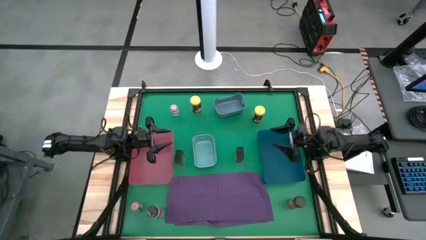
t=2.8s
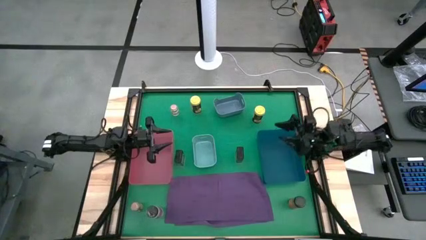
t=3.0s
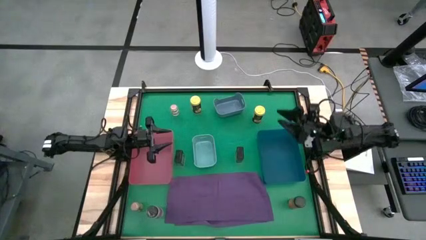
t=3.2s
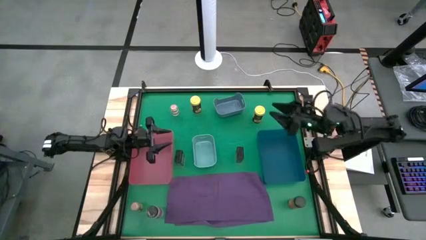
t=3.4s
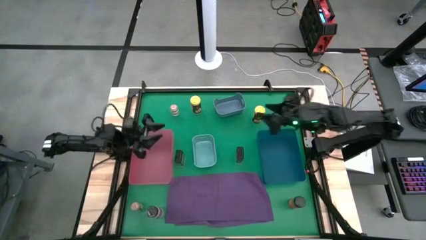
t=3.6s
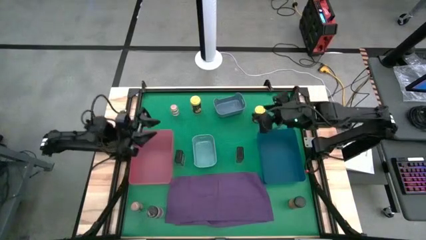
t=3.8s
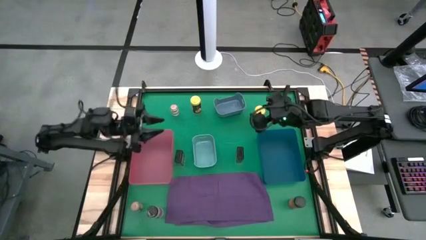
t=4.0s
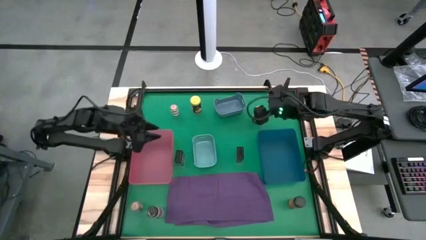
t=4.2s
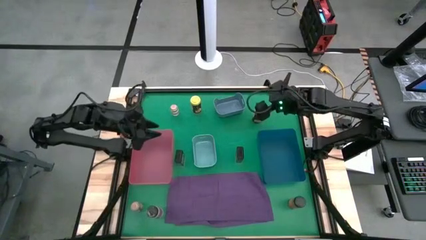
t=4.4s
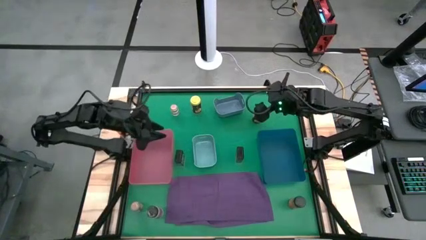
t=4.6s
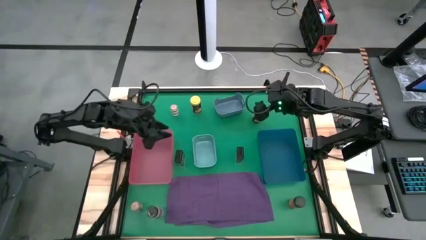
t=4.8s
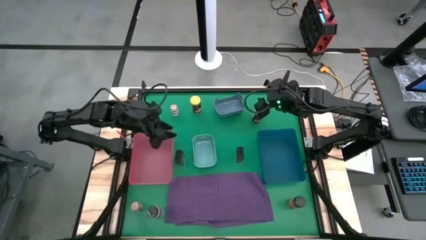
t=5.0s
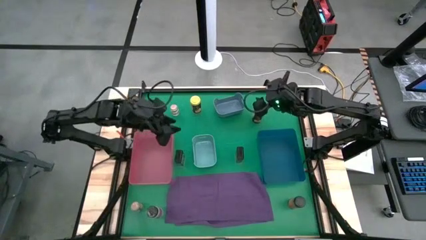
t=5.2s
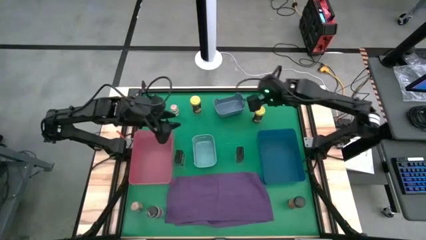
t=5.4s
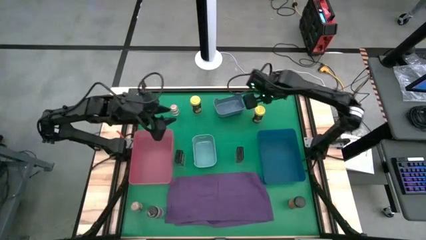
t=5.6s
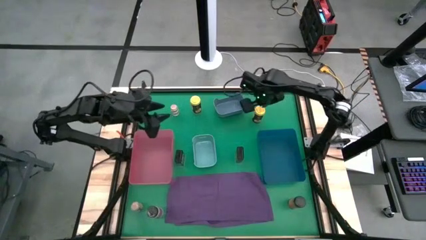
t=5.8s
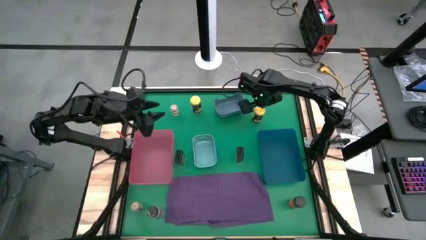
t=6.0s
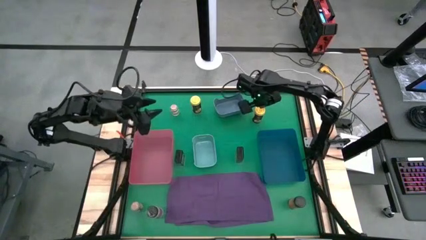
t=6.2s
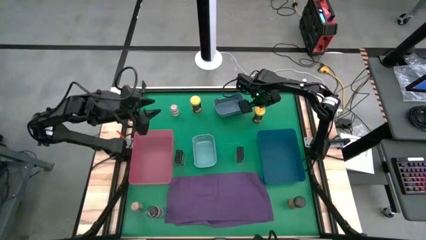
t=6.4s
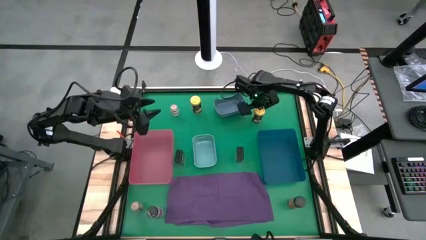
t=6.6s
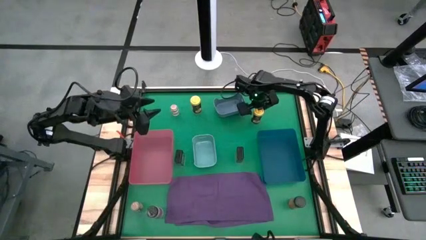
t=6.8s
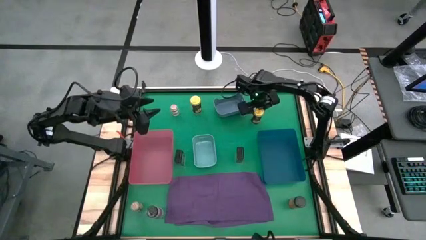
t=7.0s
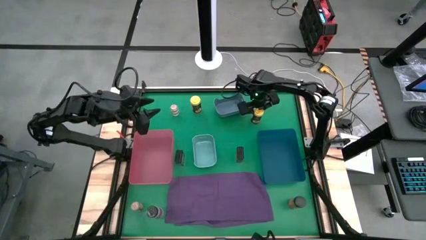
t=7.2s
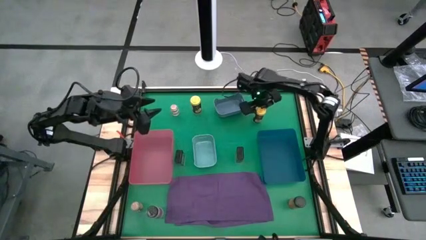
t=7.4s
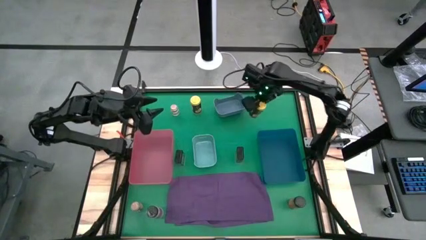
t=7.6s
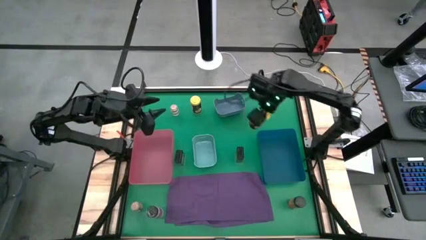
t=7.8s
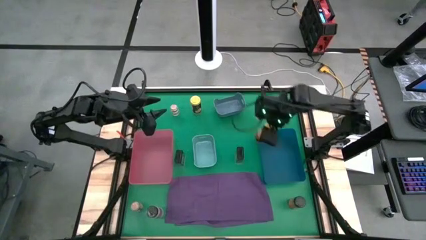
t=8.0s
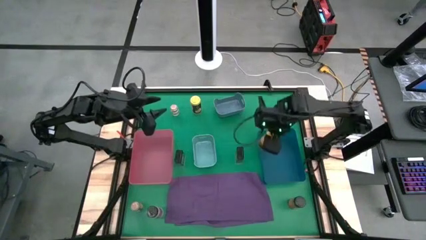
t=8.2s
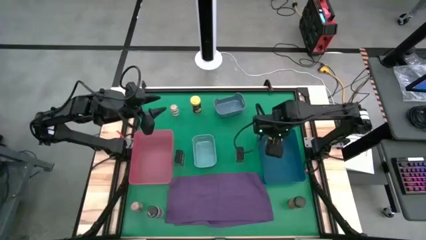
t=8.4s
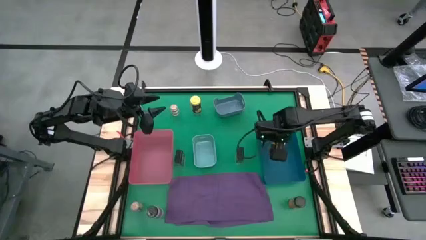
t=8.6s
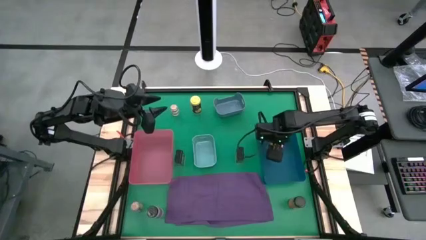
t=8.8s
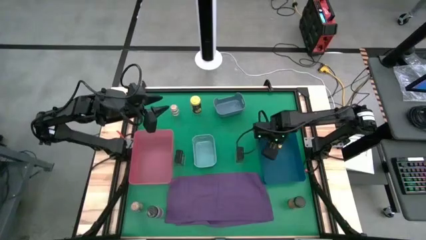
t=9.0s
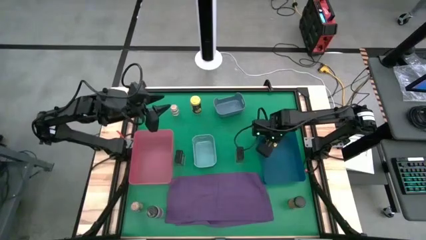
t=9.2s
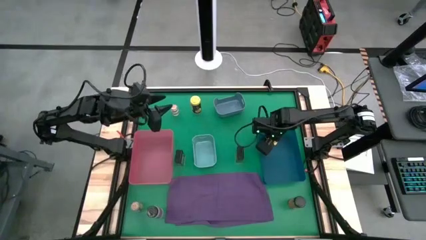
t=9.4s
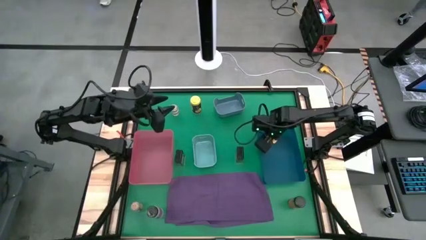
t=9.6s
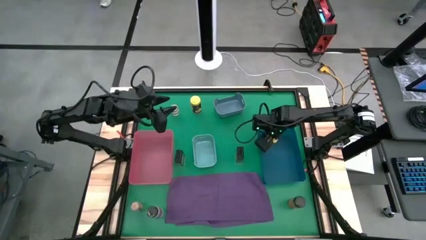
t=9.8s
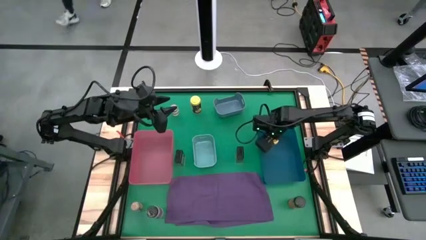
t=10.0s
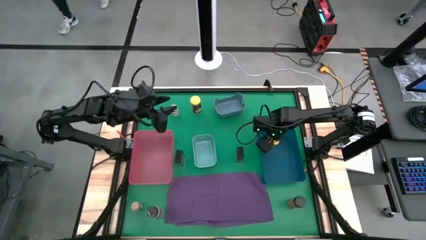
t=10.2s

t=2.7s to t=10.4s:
Task: Sort spices by type
Put the right yellow seasoning bottle into the blue bin

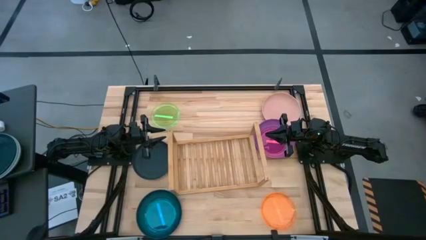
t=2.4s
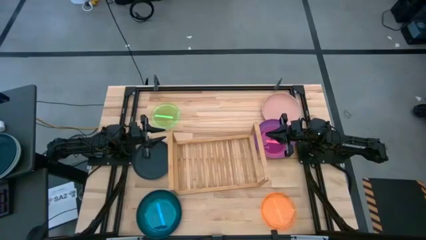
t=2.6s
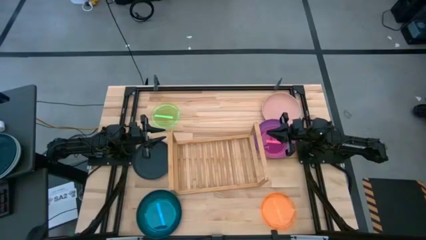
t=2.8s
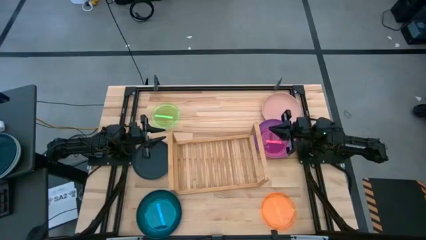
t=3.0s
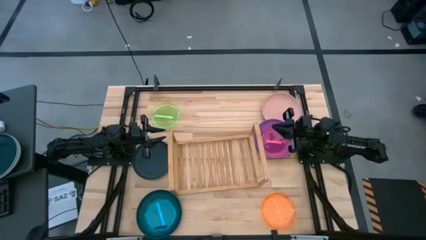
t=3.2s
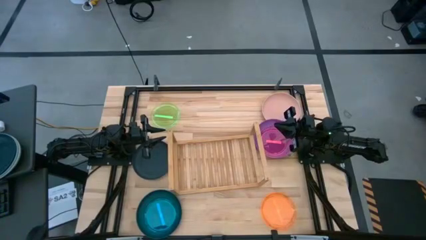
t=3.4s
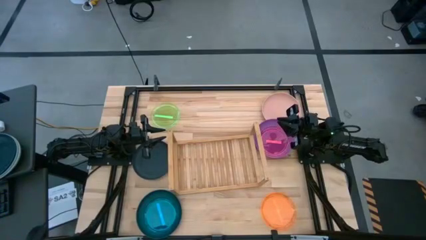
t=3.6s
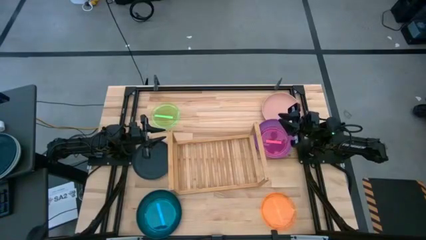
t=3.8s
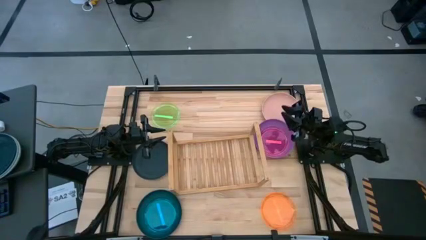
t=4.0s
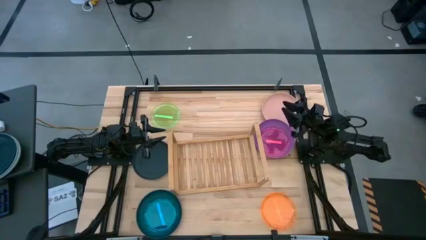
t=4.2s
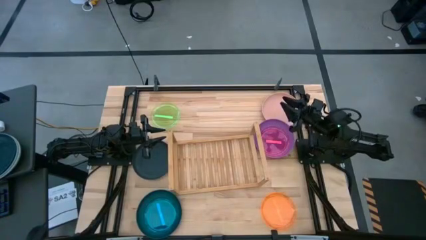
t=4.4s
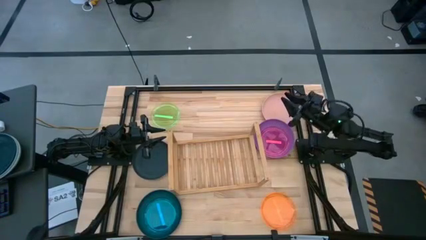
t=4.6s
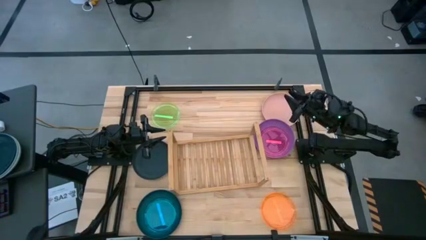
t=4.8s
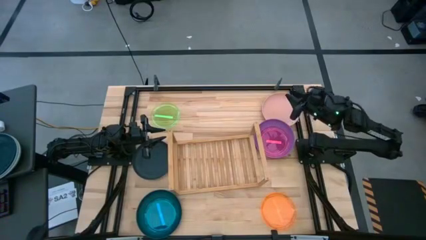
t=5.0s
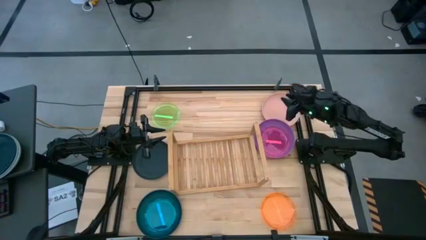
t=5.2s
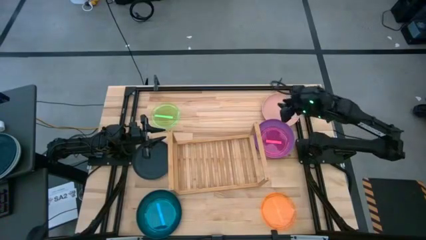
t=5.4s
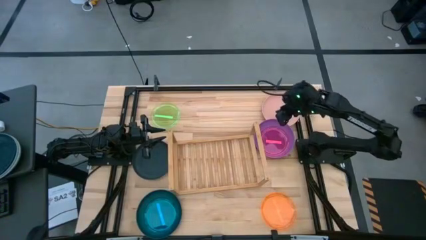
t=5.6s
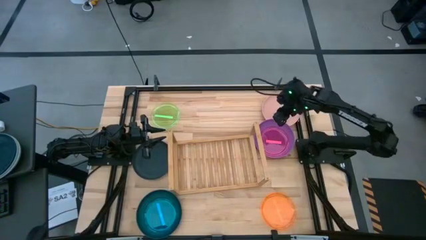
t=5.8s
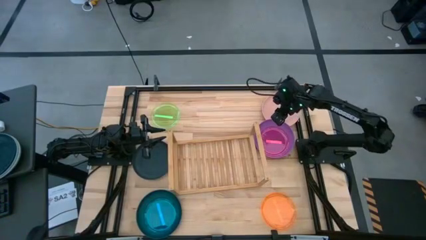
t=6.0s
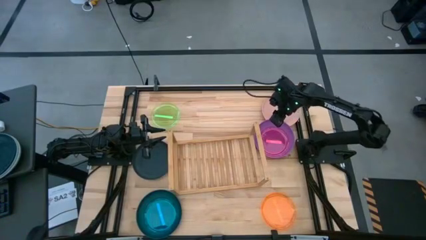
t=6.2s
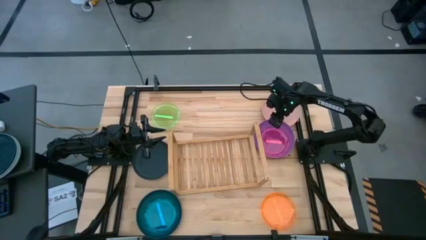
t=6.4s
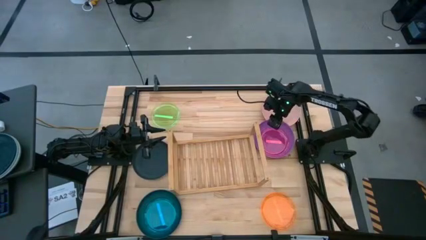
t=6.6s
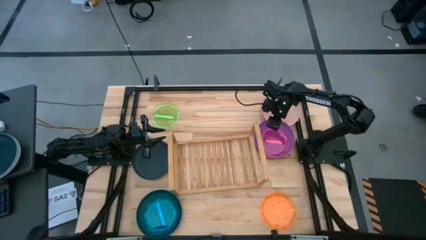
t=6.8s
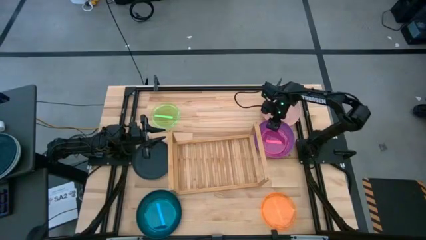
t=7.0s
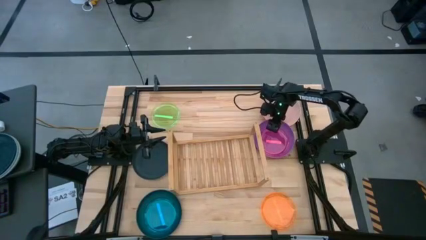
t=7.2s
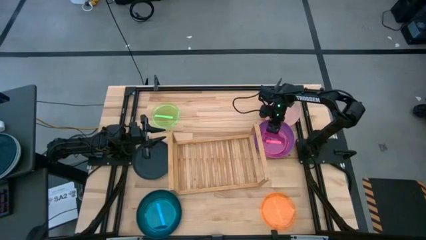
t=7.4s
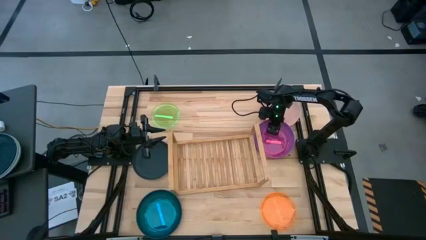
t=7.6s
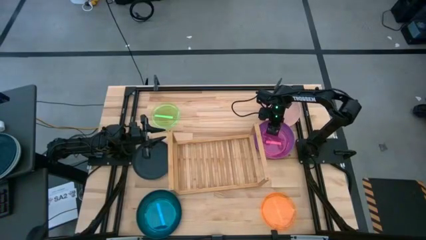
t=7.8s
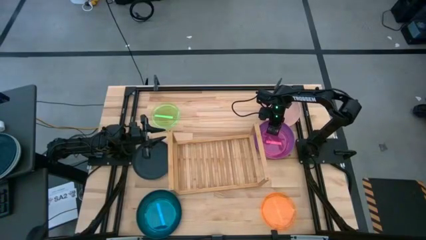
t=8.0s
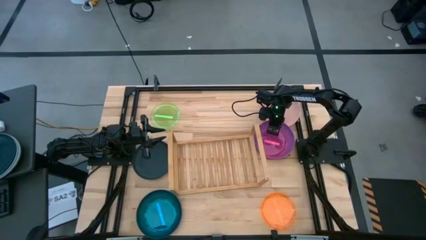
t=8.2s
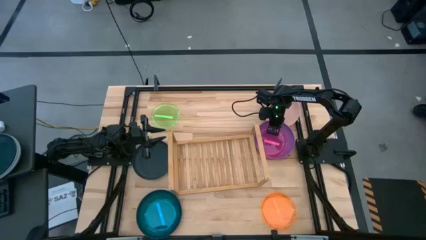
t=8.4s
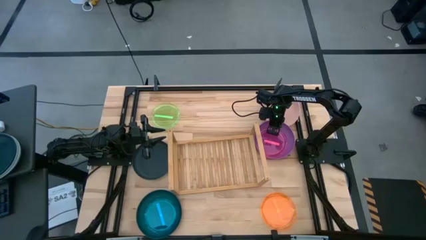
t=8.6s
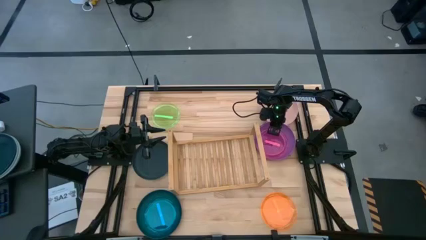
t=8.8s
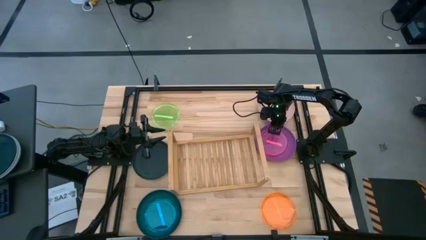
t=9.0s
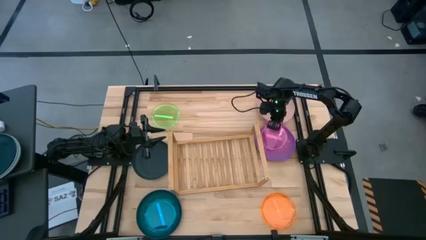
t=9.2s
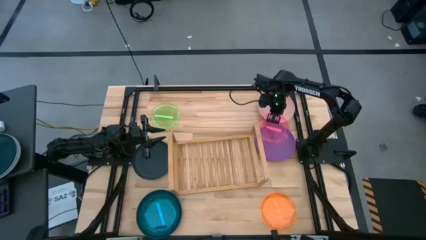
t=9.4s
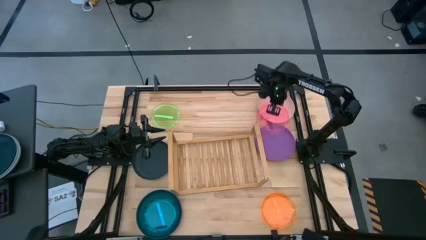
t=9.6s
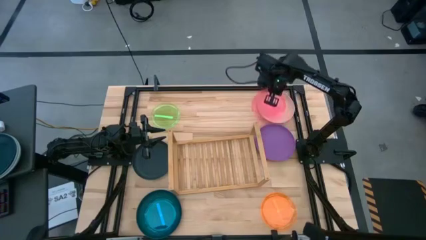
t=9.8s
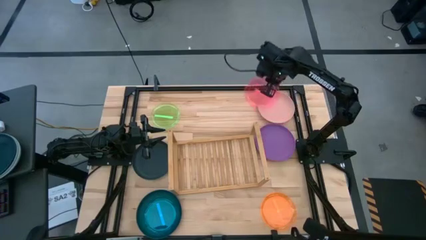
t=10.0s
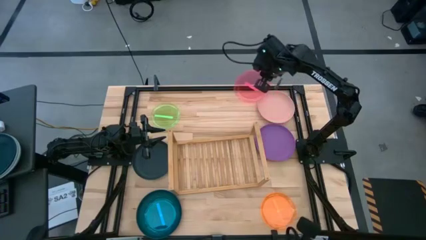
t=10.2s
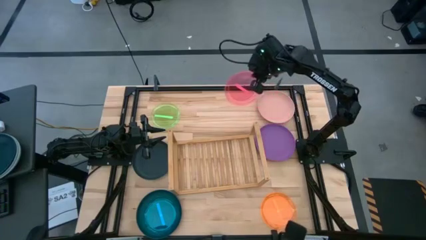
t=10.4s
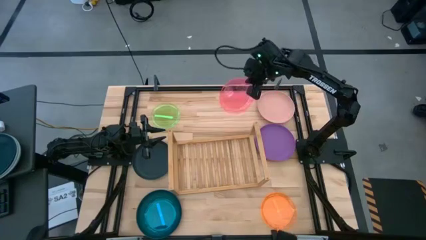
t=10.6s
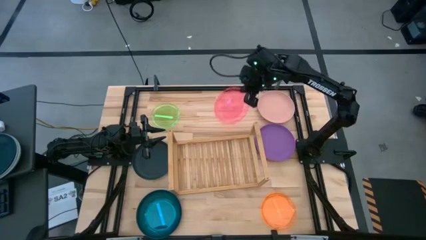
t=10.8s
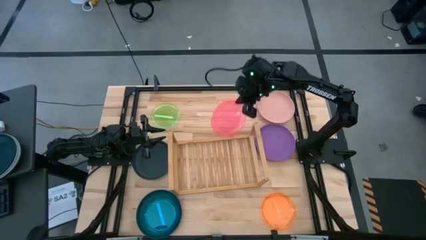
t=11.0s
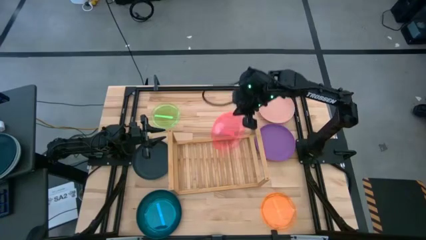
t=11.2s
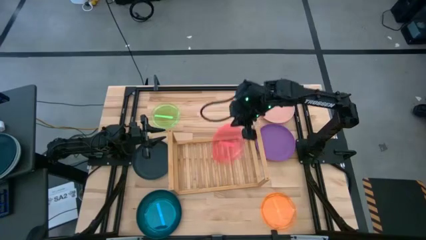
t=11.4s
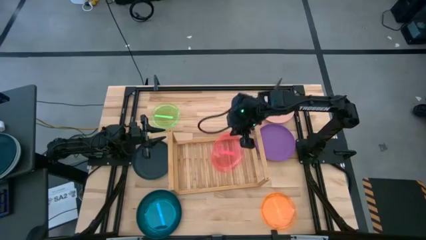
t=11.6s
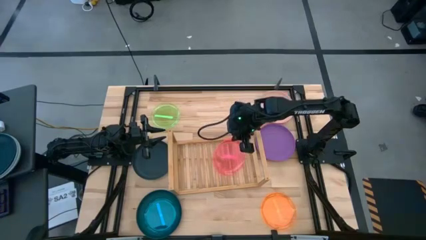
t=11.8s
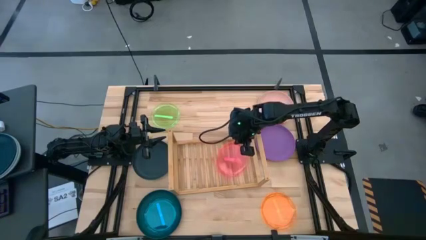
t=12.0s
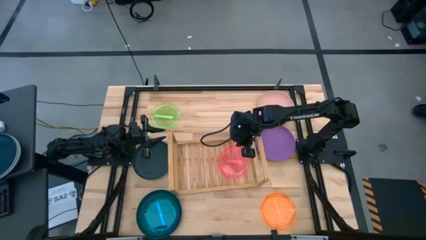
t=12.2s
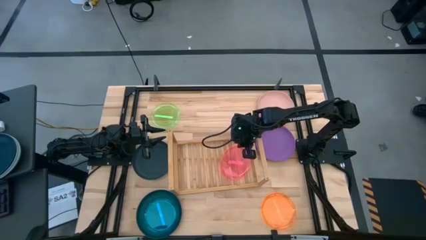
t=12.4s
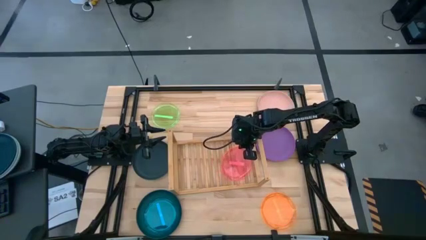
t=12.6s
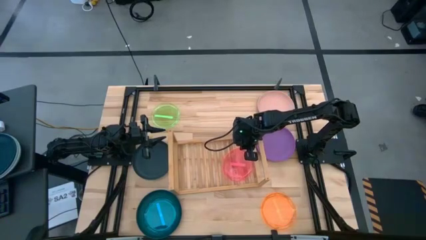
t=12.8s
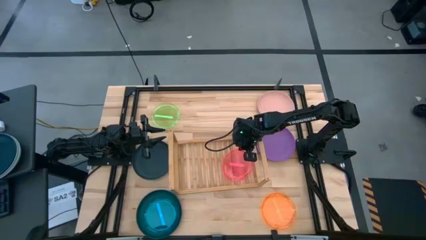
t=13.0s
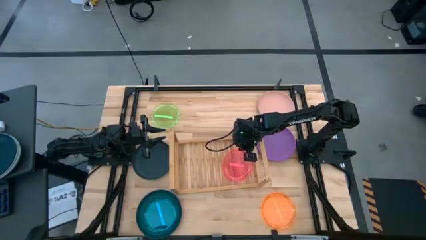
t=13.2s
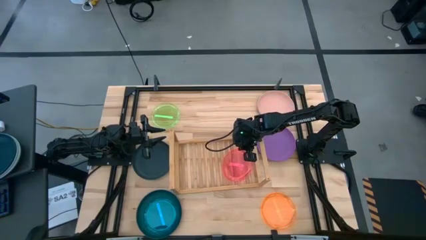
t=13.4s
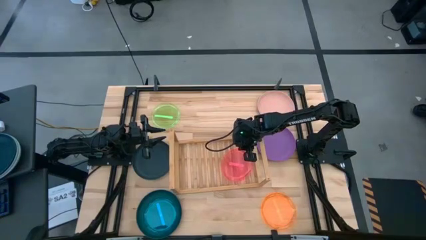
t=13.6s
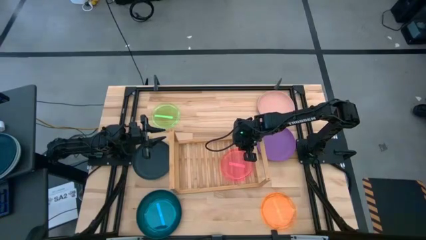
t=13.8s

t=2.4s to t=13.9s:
Task: Place and stack plates onto a shelf
Put the red plate on the shelf
